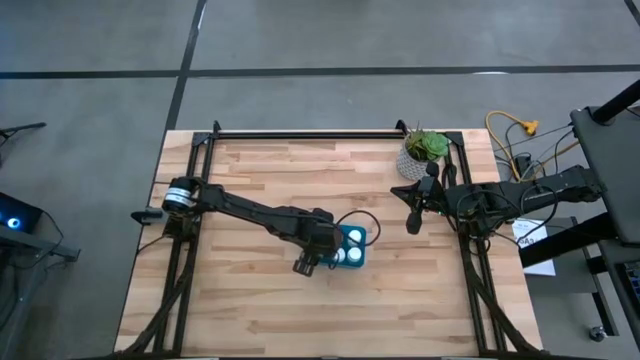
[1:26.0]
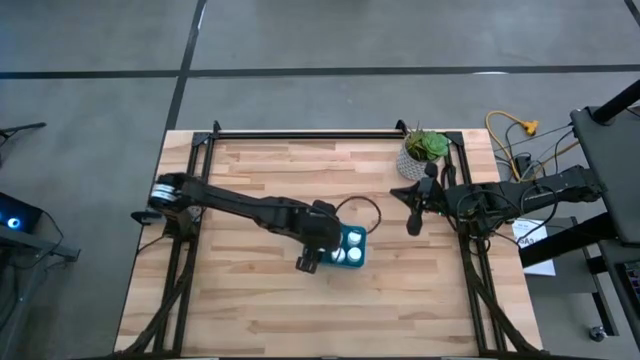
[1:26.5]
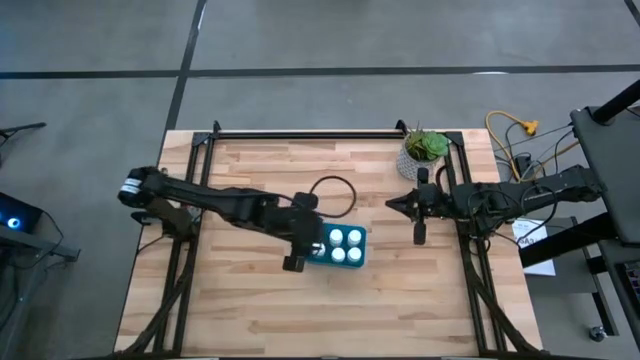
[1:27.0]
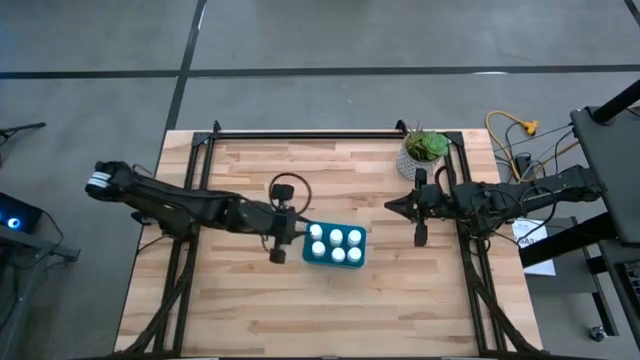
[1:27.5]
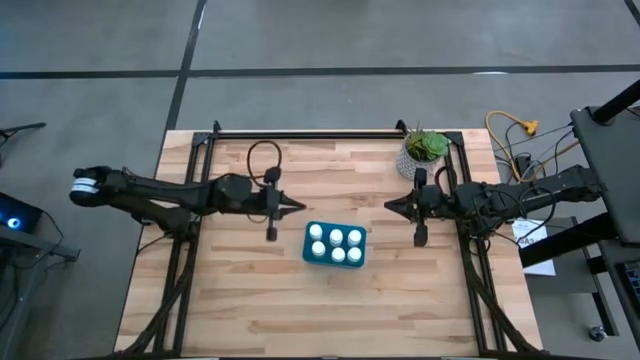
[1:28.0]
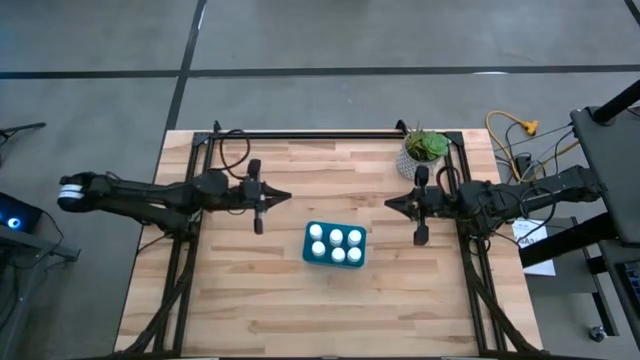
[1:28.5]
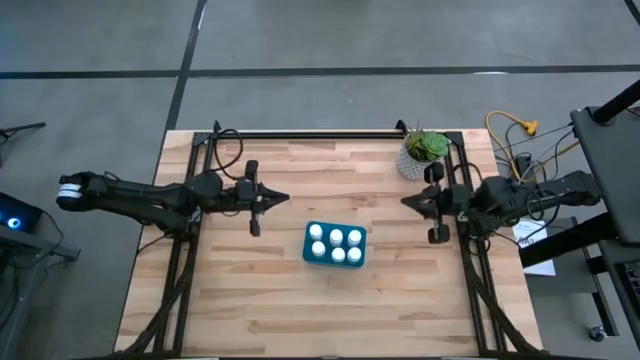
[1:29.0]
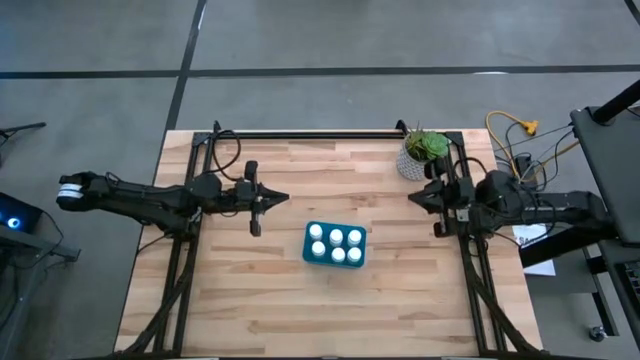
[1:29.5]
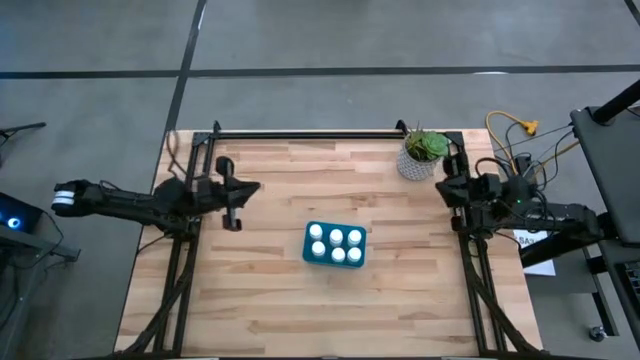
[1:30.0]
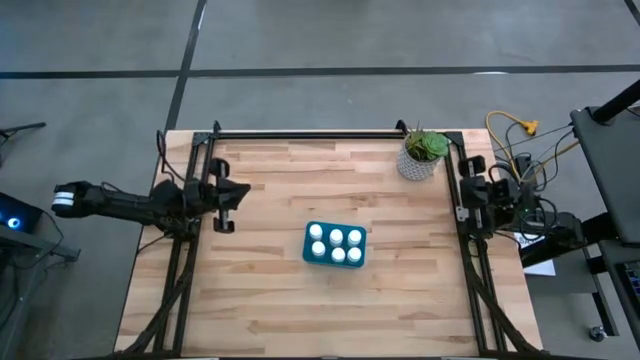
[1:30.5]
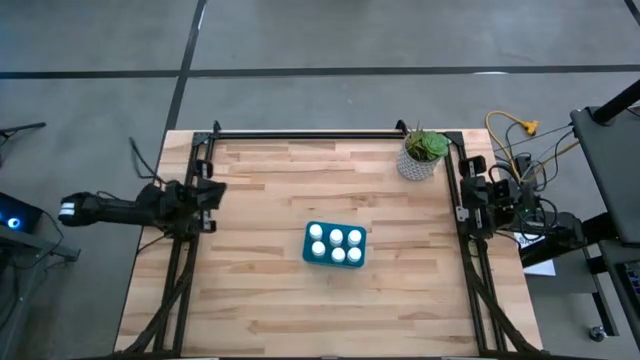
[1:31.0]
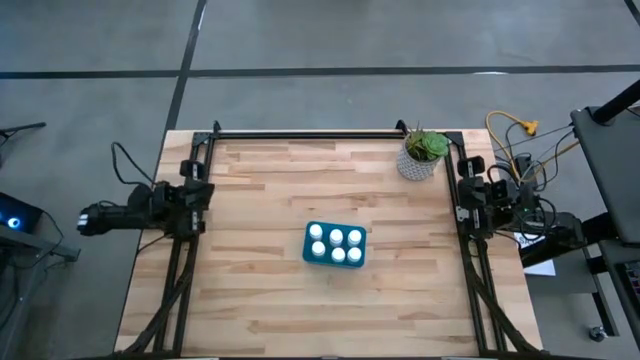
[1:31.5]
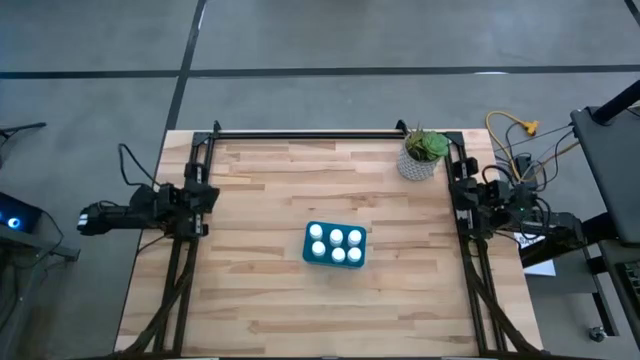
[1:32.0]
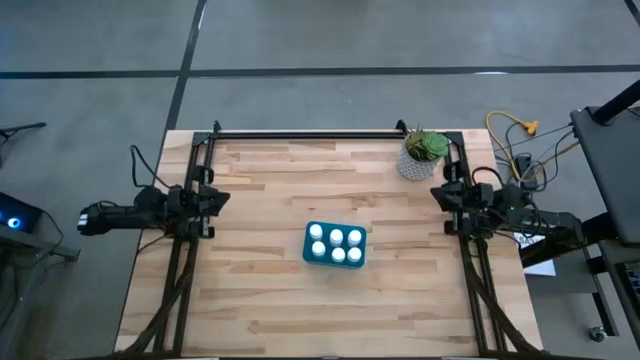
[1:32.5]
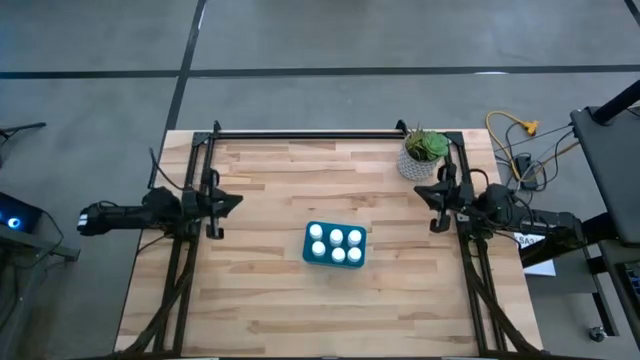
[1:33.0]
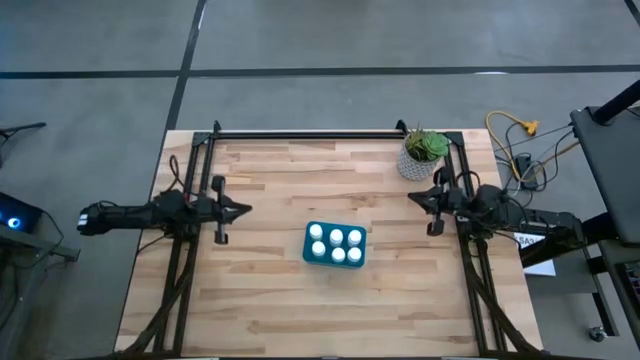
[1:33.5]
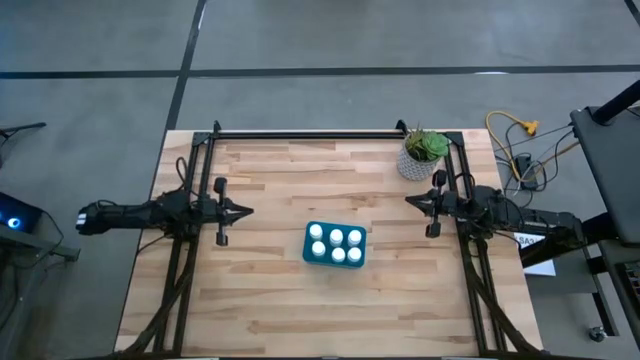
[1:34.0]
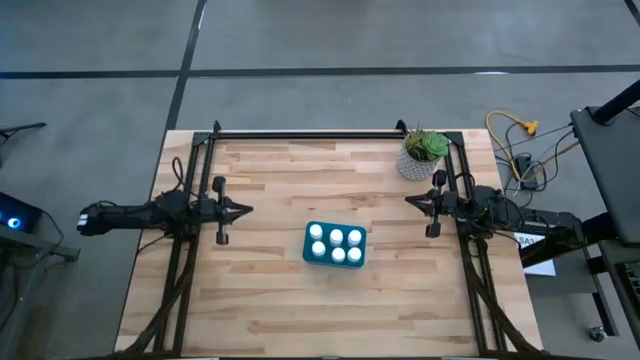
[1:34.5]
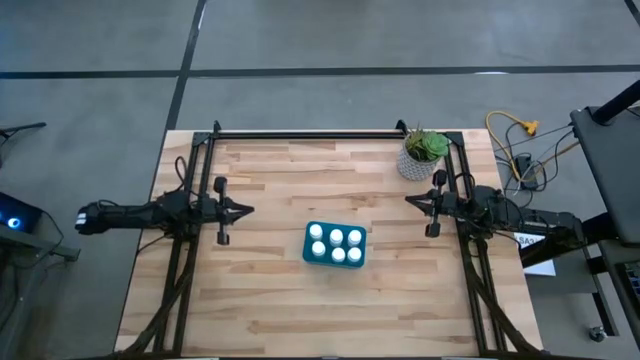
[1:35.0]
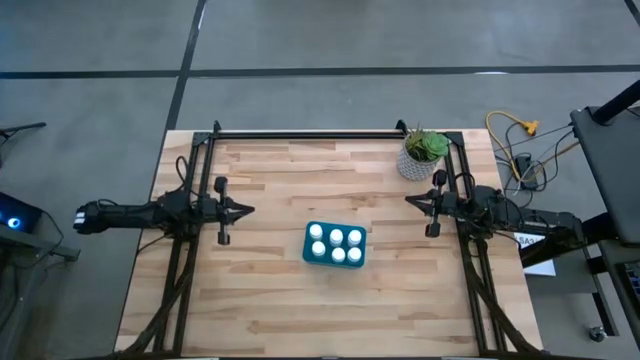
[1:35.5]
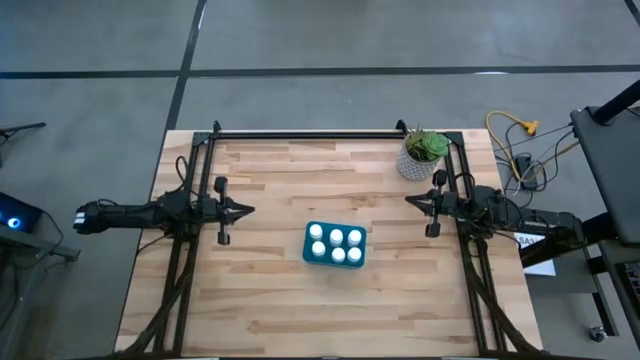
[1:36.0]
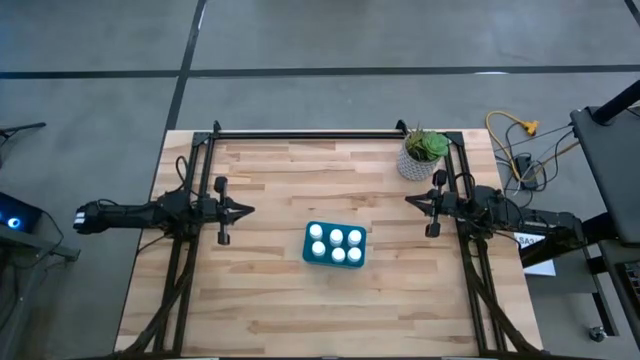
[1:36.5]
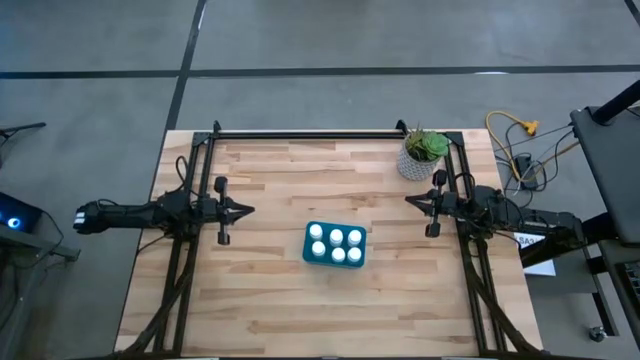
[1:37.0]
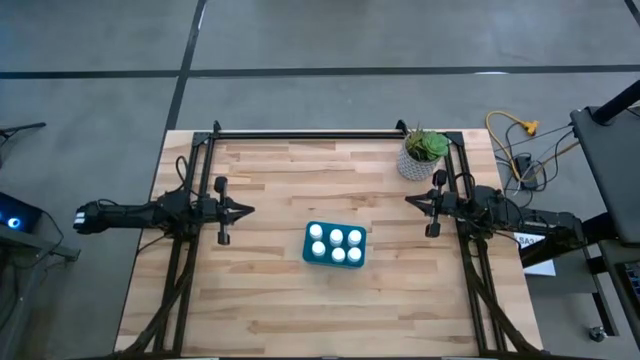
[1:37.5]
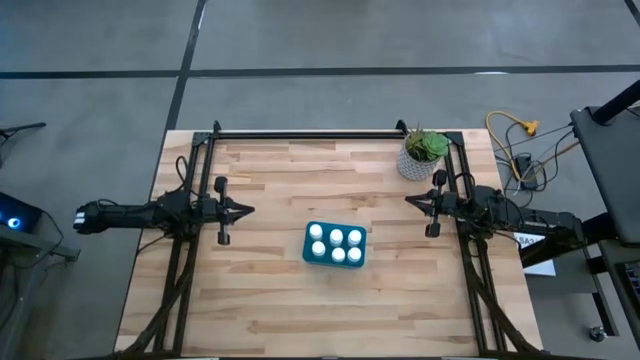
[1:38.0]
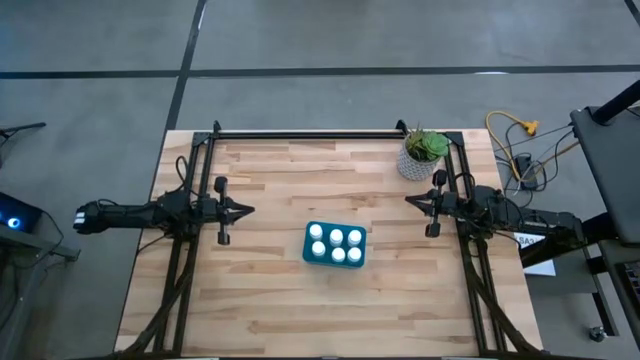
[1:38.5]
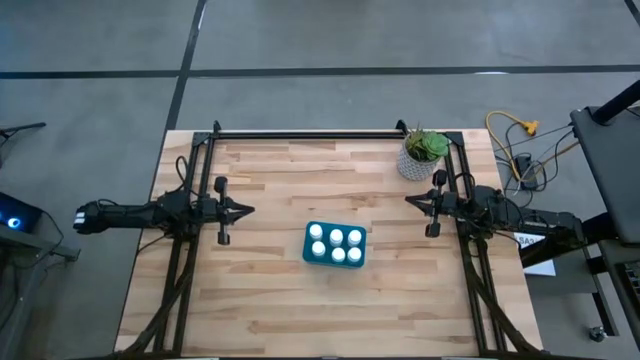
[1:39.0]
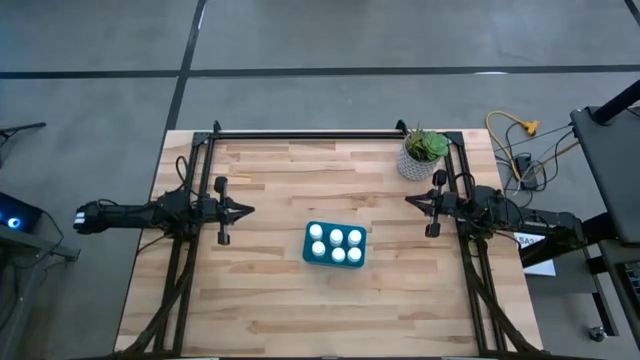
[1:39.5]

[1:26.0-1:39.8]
Task: Pick and place pill bottles into a basket
Return to Home Position

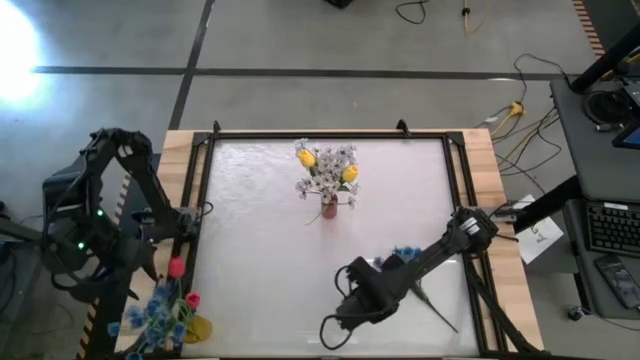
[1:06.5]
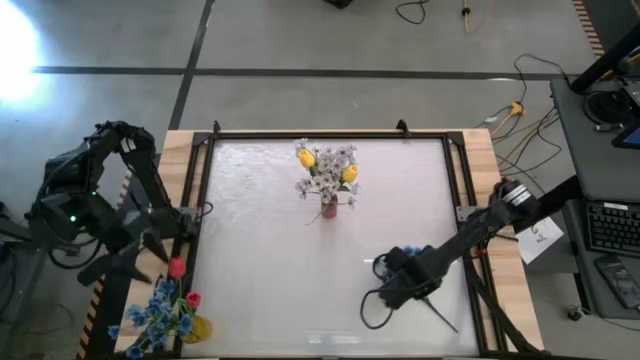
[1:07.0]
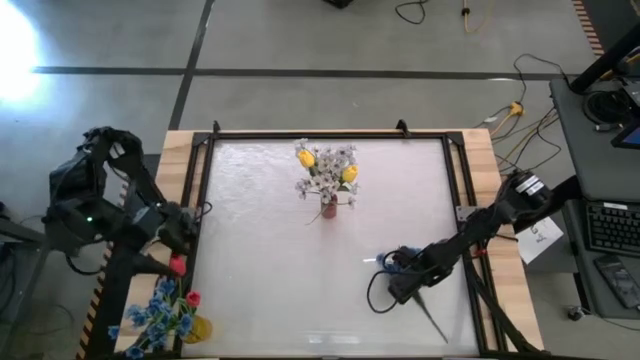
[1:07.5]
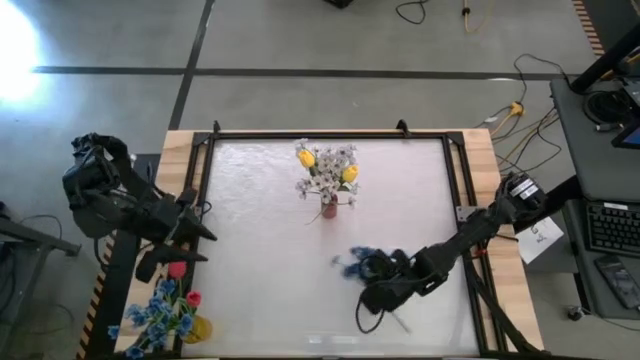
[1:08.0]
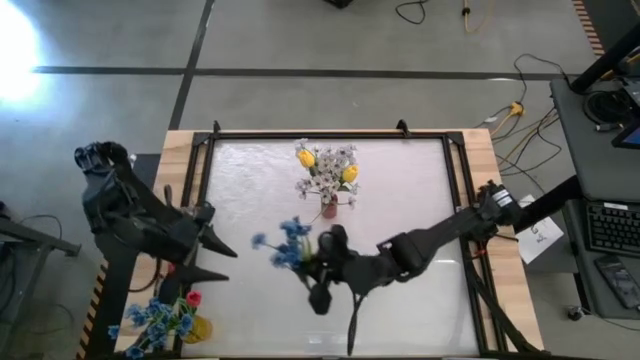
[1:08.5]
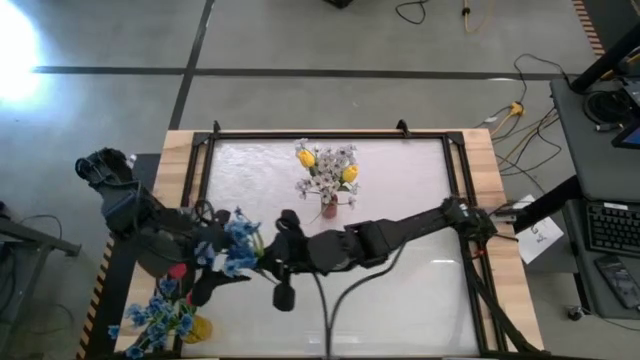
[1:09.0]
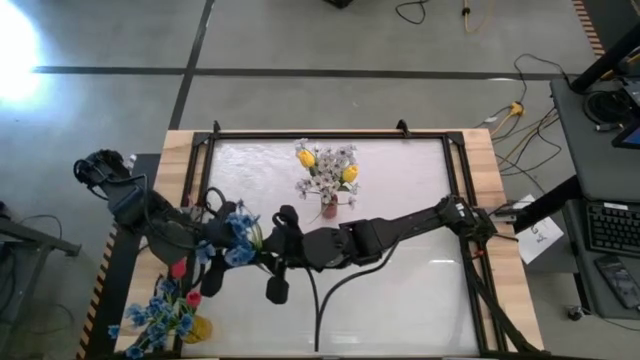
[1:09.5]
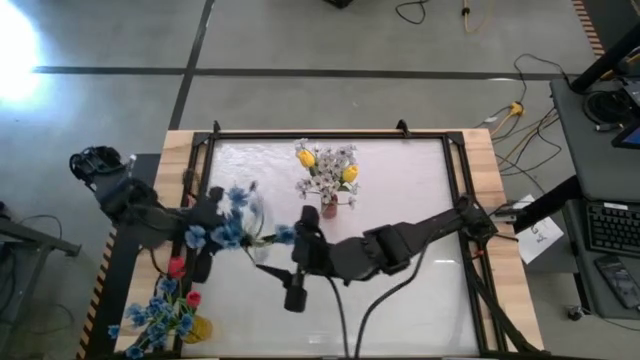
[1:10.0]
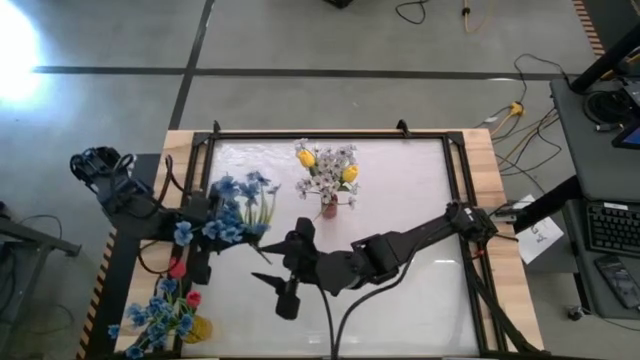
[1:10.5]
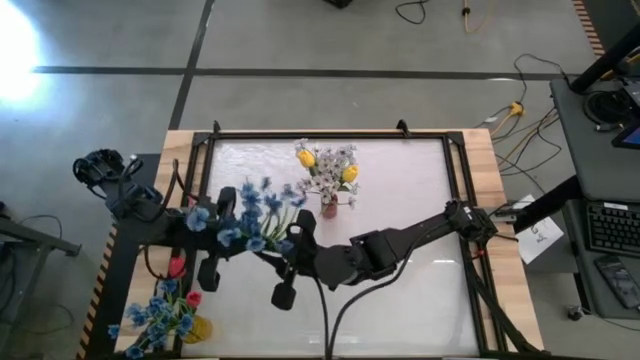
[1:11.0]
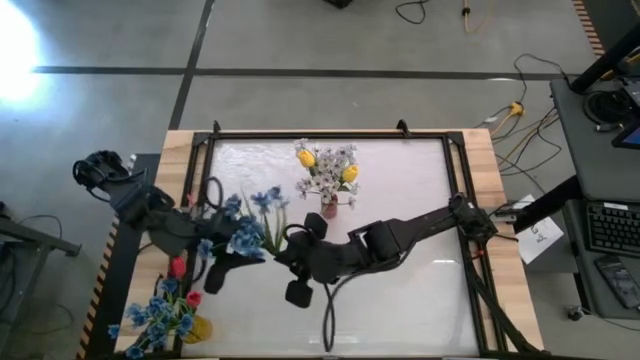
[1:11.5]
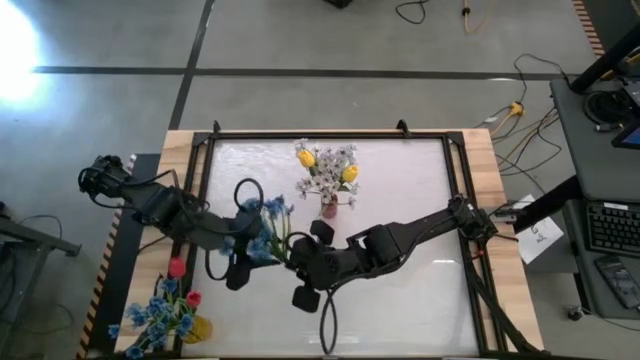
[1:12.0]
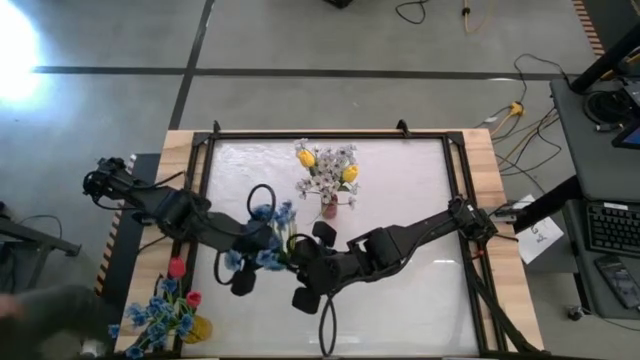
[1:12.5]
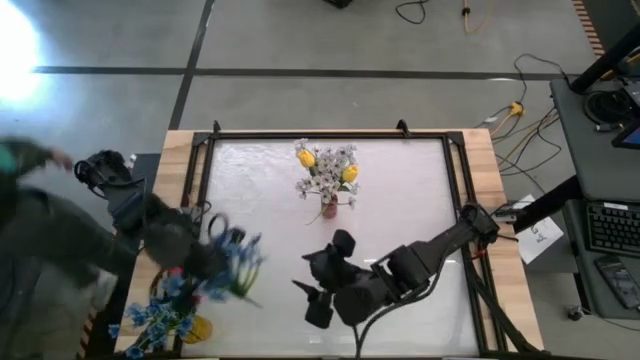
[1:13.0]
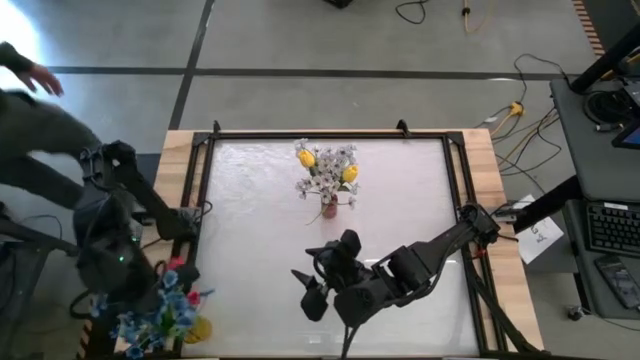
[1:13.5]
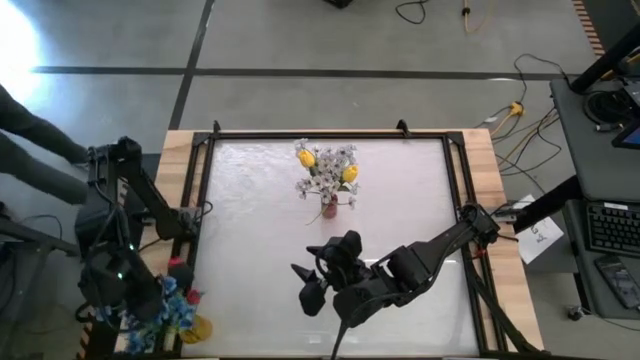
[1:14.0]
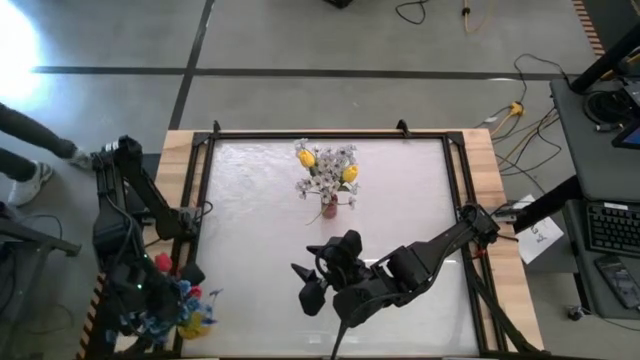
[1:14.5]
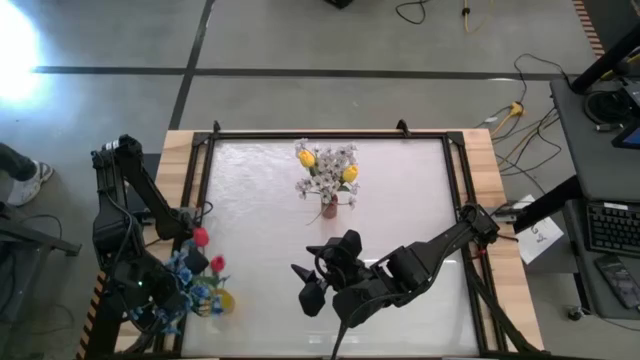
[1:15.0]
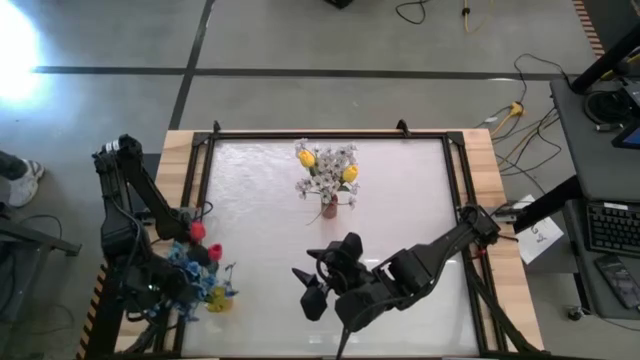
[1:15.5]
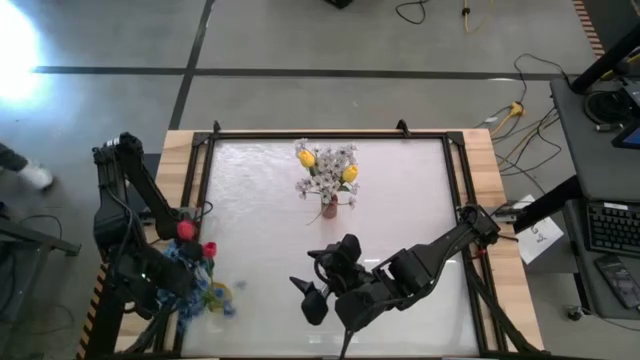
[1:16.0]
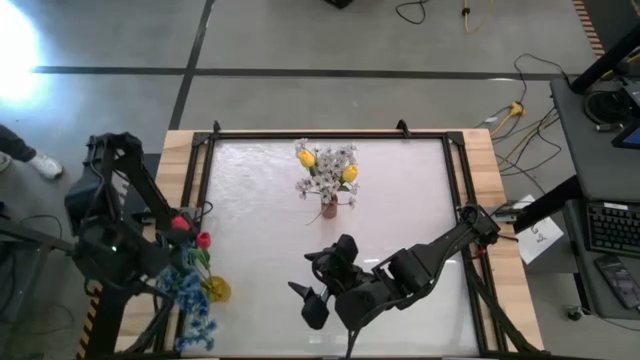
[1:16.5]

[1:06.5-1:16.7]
Task: Sort flowers into vase by color
Put the blue flower into the yellow flower vase
